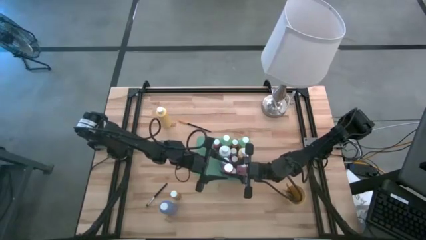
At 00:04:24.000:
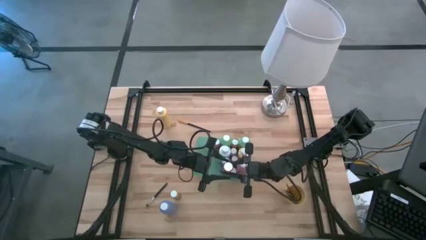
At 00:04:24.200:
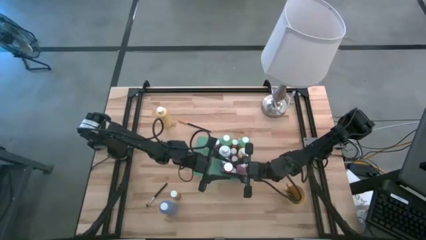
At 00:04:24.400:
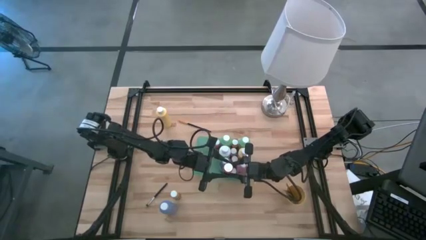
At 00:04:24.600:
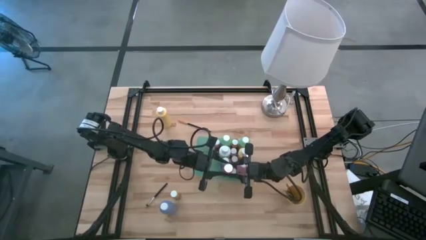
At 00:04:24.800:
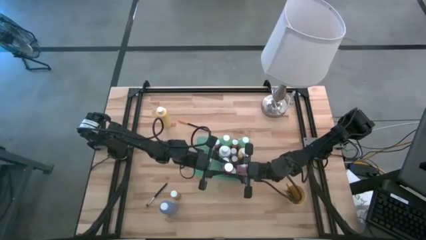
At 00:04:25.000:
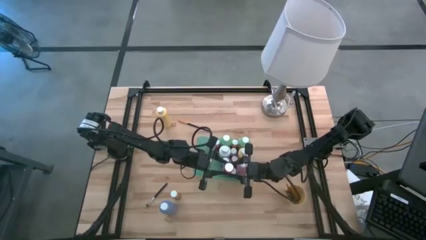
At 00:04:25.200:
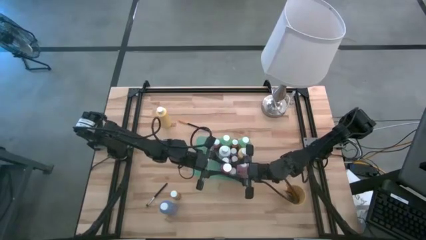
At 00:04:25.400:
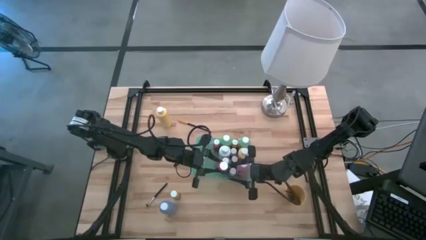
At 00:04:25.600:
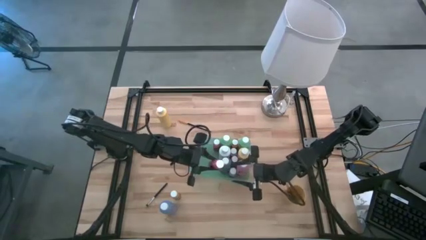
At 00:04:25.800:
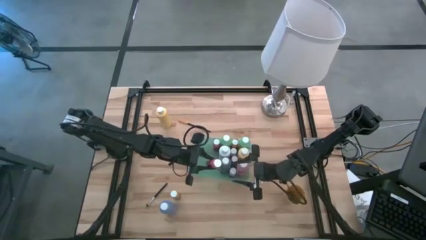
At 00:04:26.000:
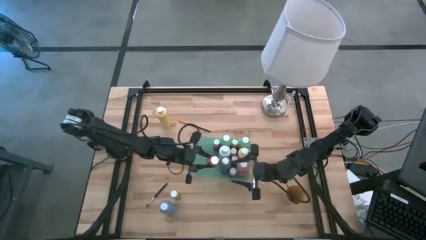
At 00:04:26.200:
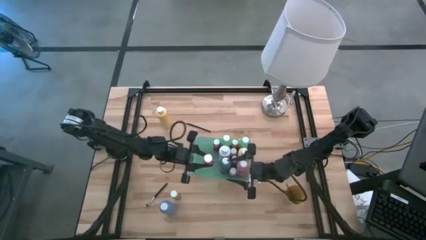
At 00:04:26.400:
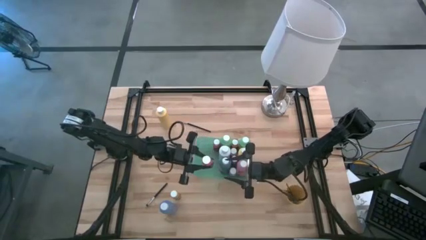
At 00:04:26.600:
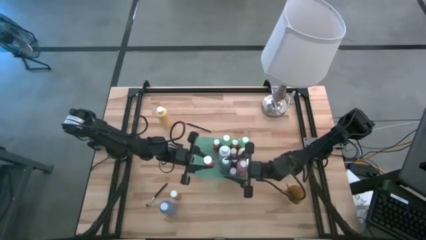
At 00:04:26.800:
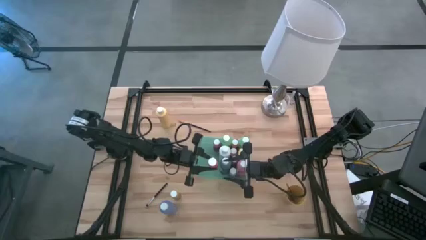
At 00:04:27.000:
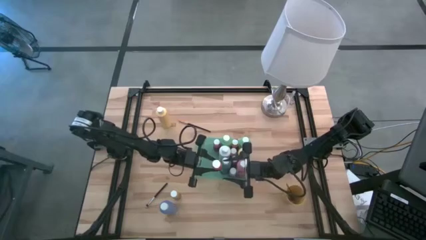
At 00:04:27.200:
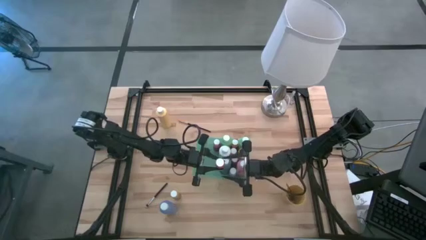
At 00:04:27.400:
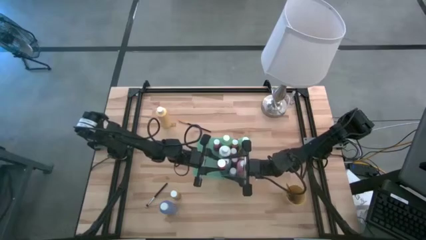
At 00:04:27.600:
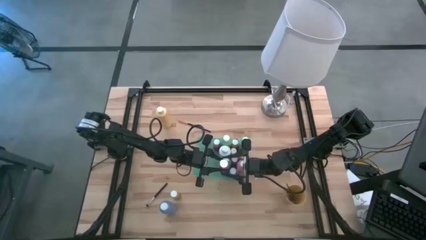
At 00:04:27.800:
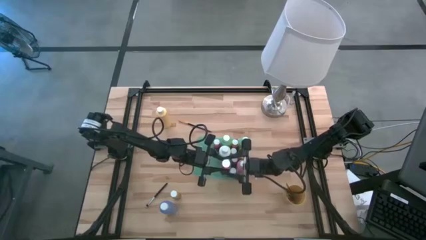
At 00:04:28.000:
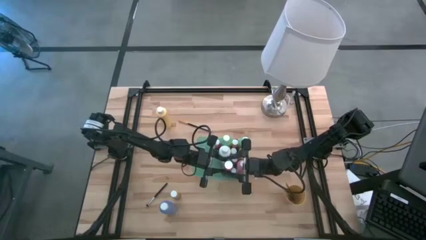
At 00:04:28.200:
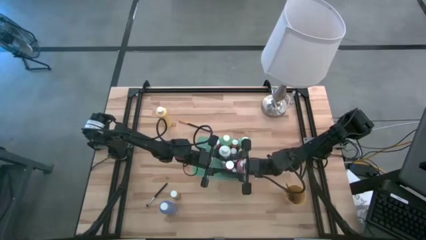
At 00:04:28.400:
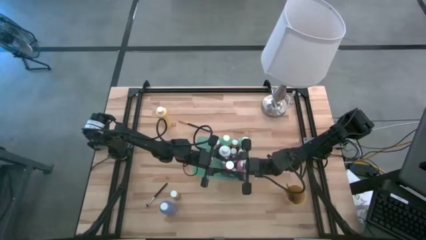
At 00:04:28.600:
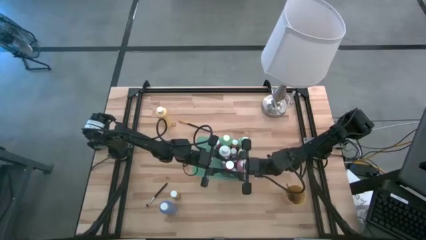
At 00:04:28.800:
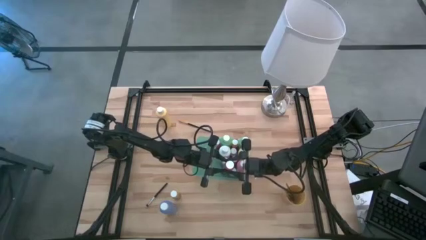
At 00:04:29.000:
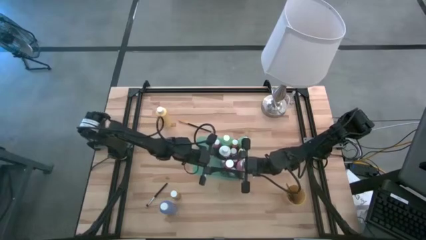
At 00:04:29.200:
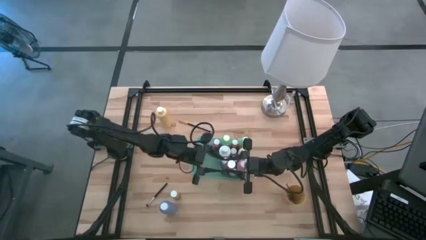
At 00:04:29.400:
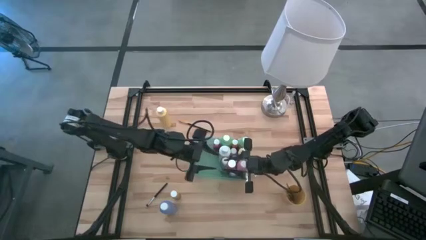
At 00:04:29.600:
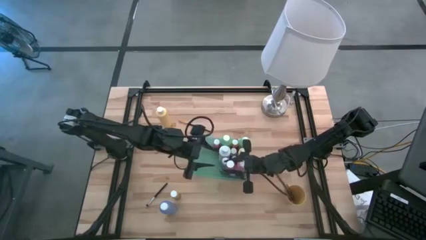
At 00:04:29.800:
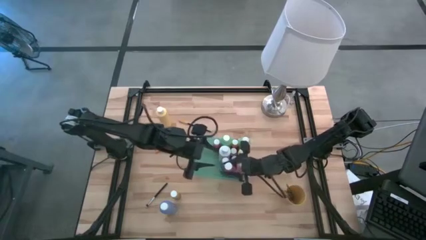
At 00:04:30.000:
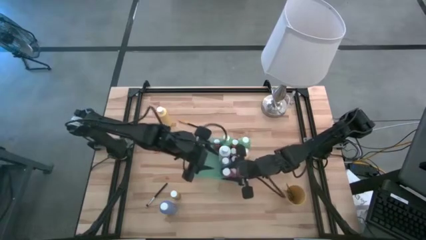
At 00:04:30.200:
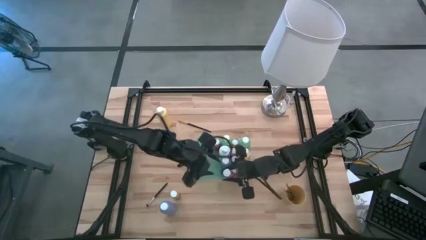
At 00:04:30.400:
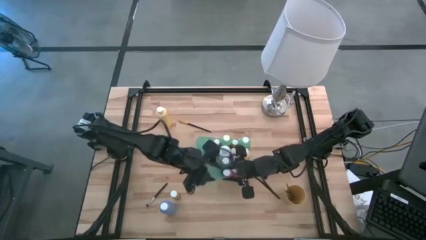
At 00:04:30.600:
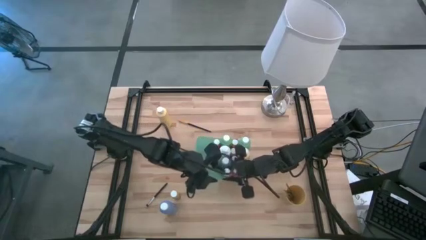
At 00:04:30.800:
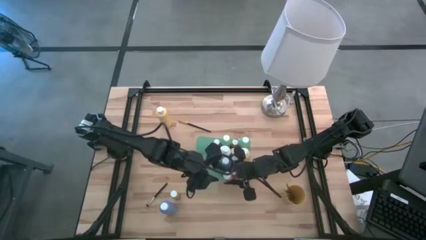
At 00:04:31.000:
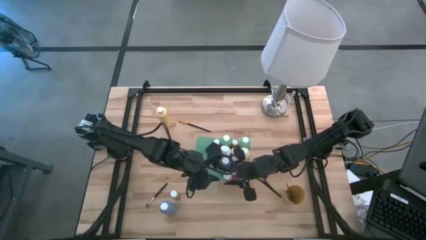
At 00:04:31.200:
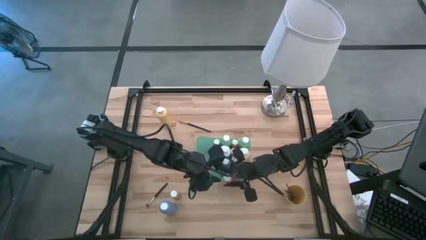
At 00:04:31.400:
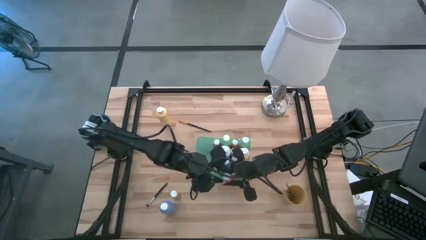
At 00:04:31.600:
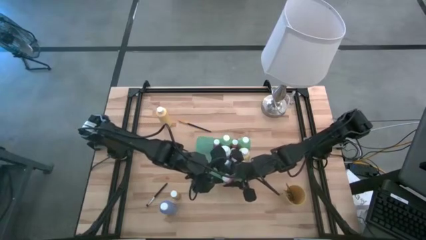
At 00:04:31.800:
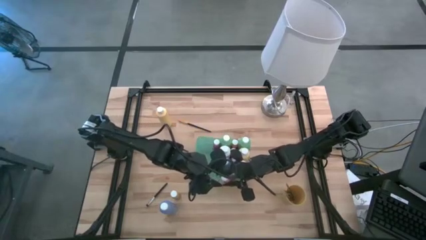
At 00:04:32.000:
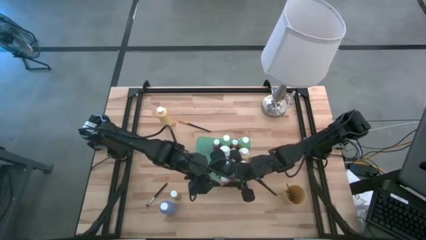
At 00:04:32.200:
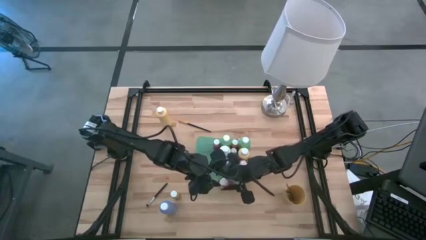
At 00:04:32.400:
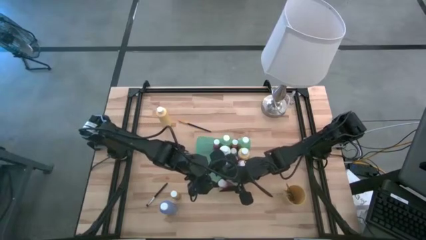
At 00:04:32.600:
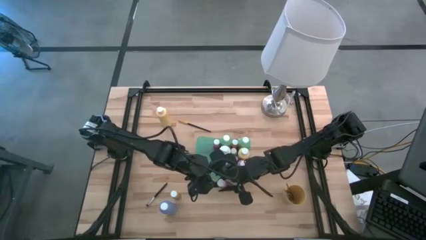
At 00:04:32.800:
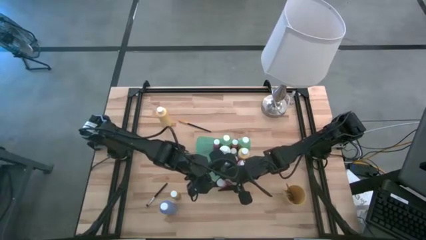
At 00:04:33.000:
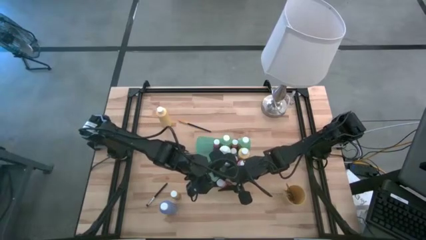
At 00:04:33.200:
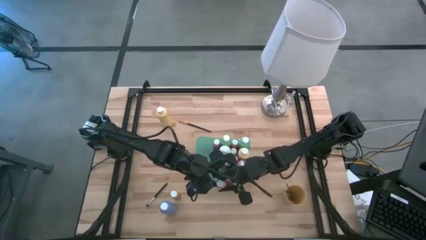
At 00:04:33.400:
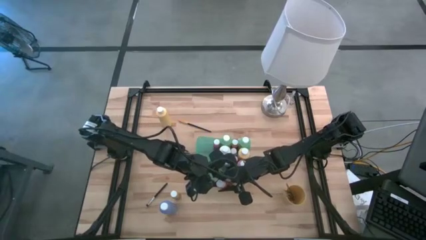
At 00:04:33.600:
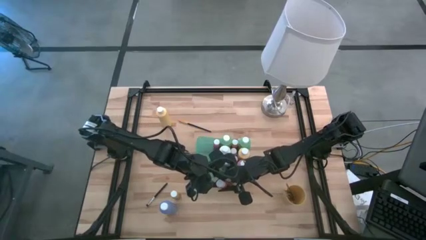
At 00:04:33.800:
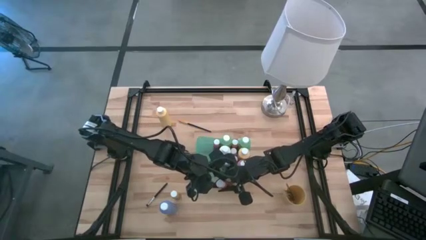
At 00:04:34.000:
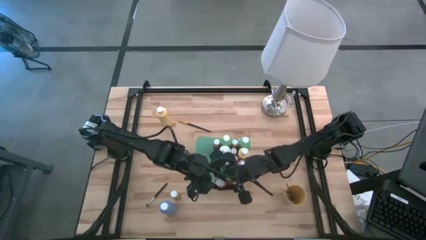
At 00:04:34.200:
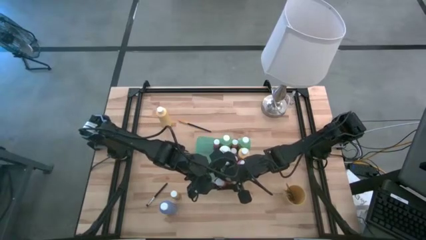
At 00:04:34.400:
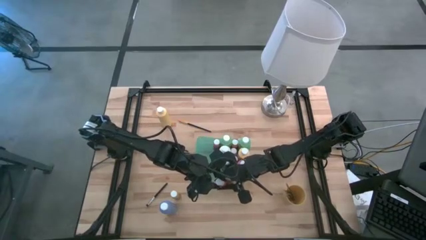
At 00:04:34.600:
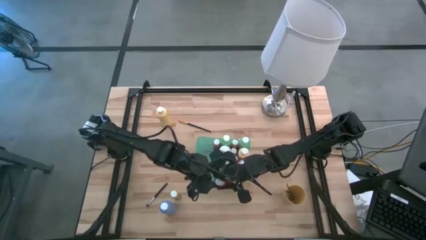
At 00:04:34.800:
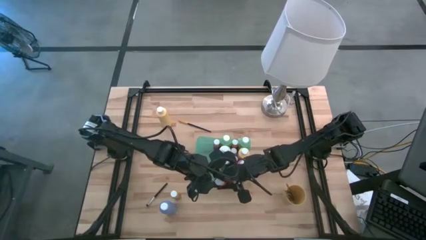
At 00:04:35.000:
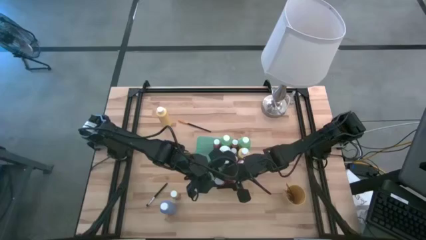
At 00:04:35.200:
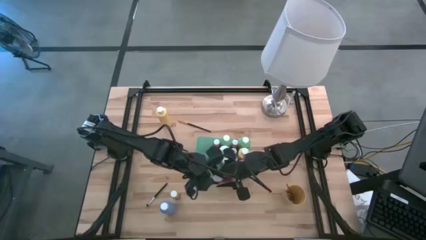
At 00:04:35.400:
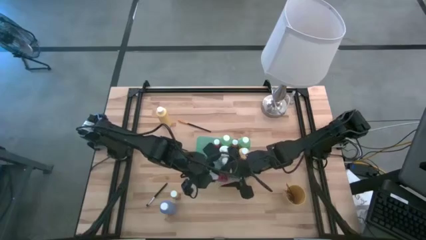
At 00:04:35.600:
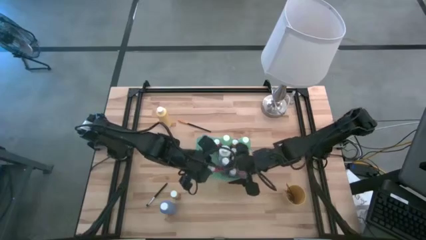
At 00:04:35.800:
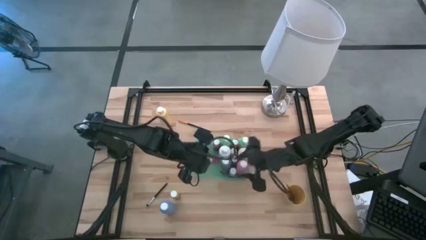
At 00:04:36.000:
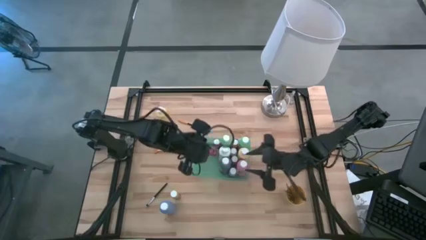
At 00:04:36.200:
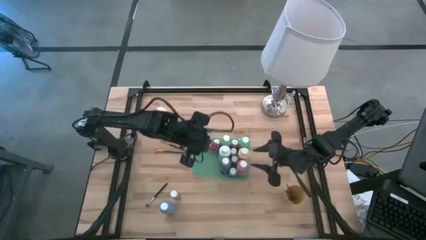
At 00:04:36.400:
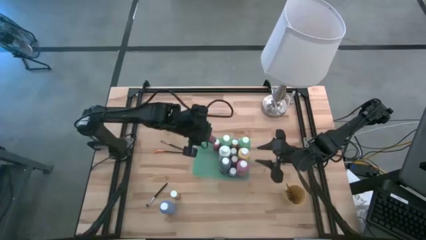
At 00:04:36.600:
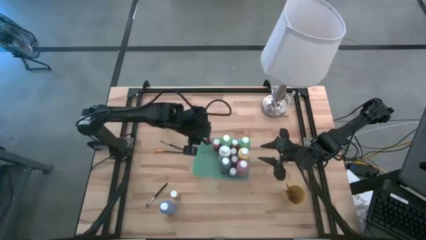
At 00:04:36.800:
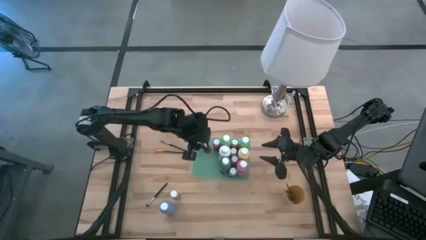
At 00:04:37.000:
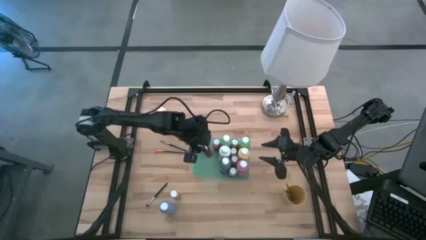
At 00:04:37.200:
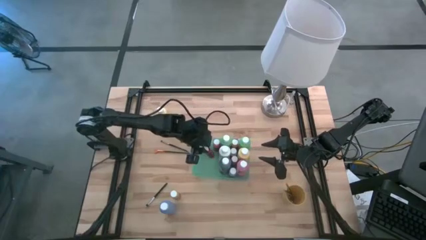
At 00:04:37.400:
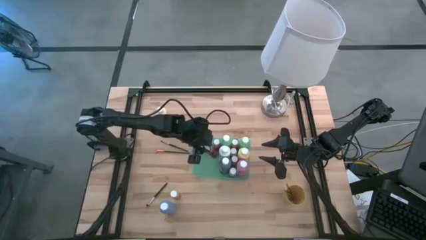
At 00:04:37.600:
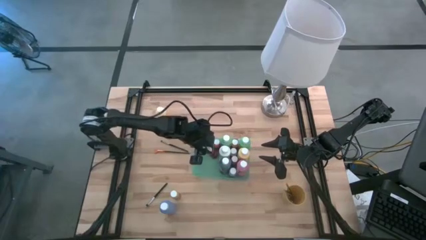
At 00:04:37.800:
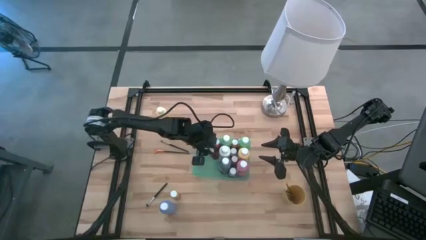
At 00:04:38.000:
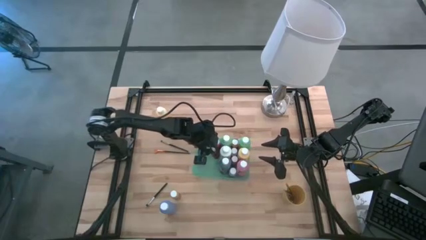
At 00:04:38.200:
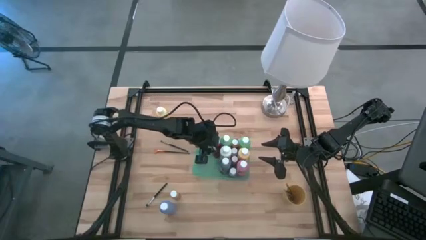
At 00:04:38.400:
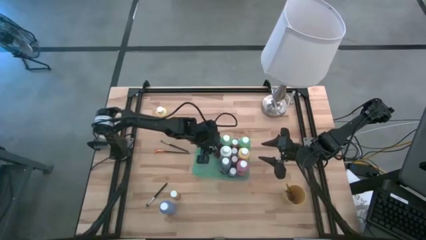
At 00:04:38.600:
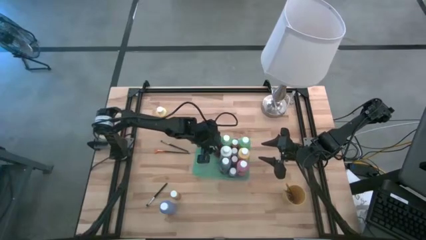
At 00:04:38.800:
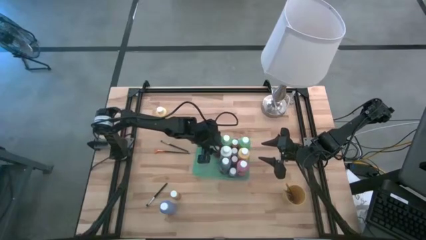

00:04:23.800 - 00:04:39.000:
Task: Pick & Place Paint Supplies
Put the red paint bottle into the green bin
